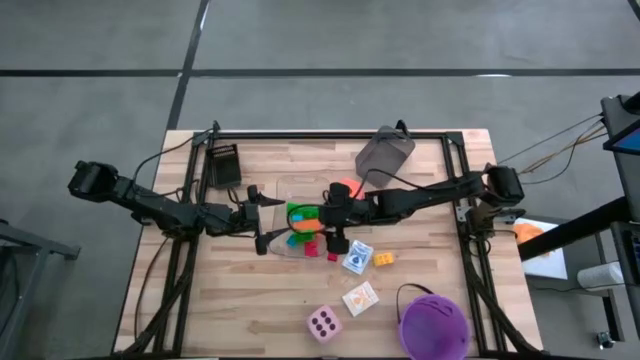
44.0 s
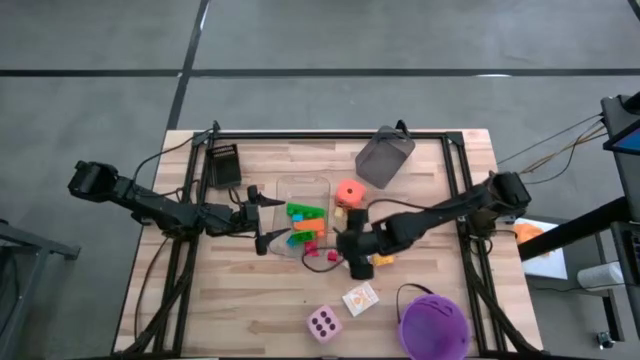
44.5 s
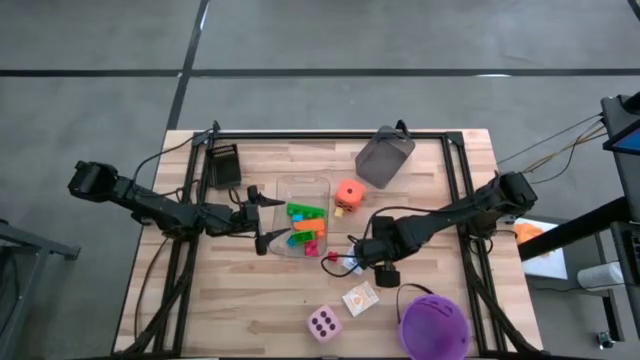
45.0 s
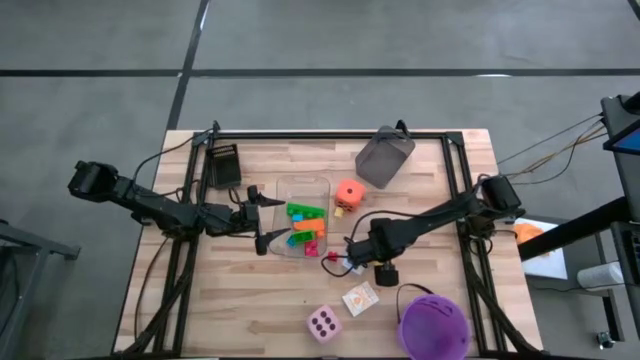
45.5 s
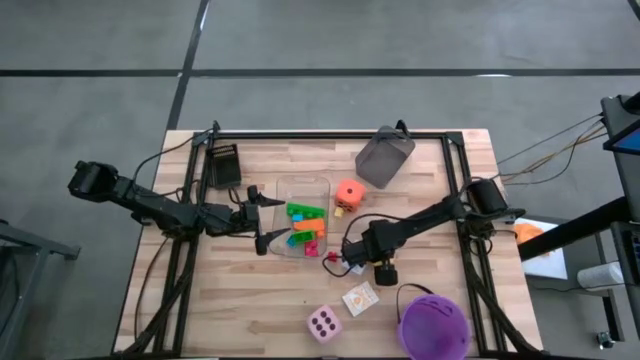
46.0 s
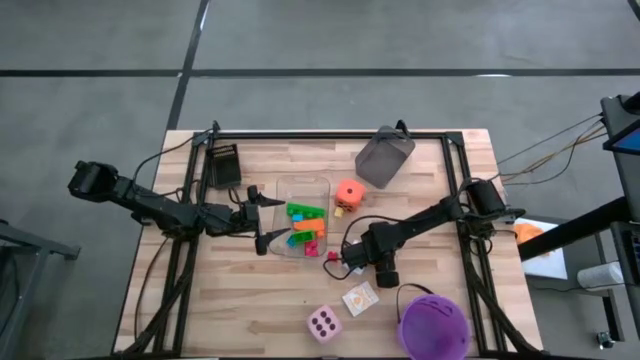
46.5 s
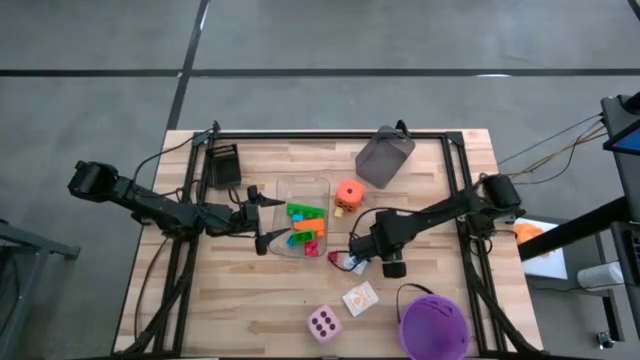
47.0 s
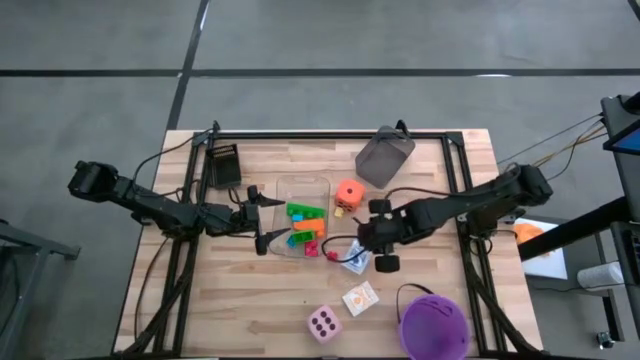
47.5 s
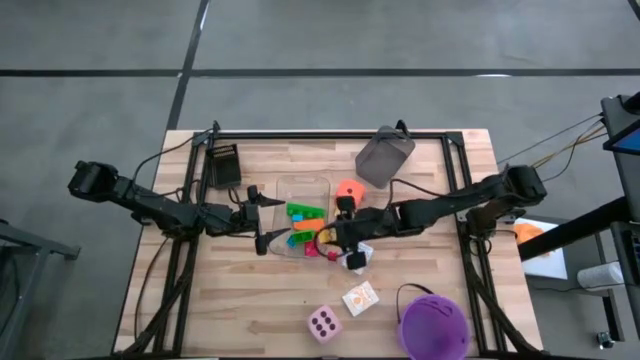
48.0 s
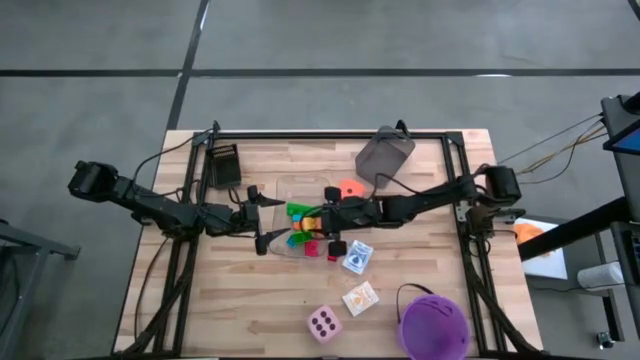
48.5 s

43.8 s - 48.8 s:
Task: Pick & Place Toys
Put the yellow game piece into the transparent bin

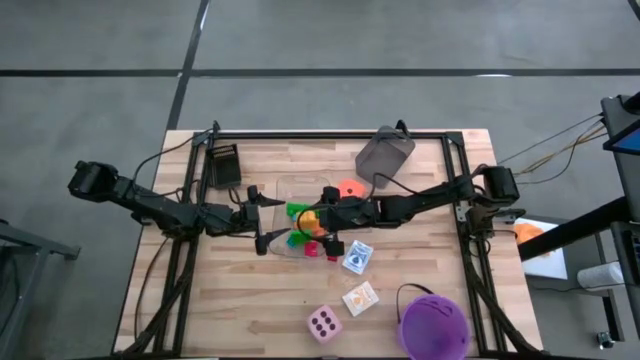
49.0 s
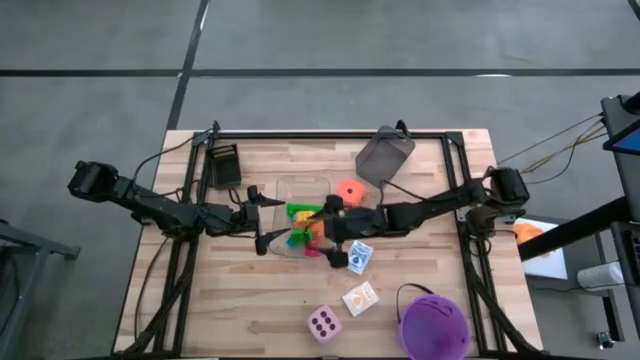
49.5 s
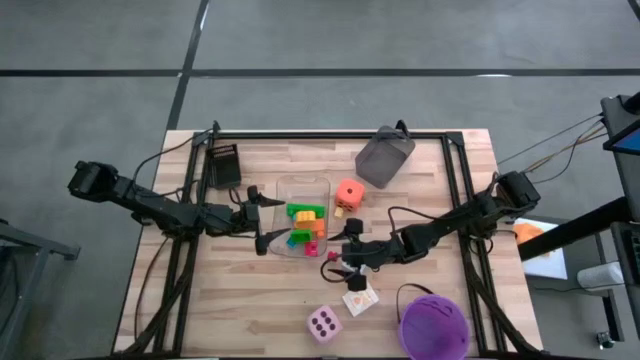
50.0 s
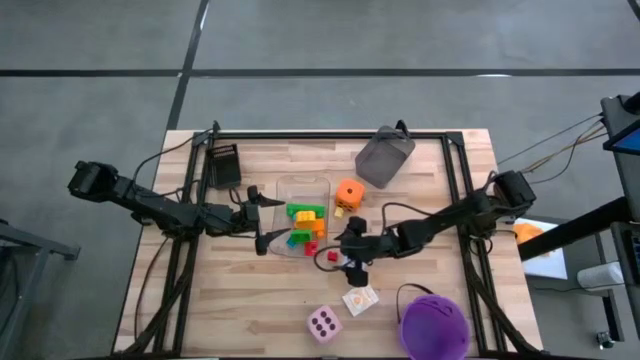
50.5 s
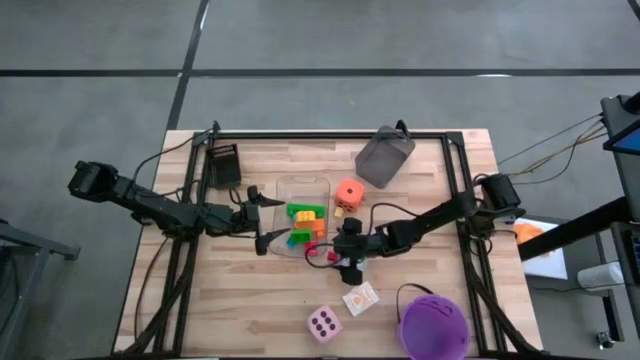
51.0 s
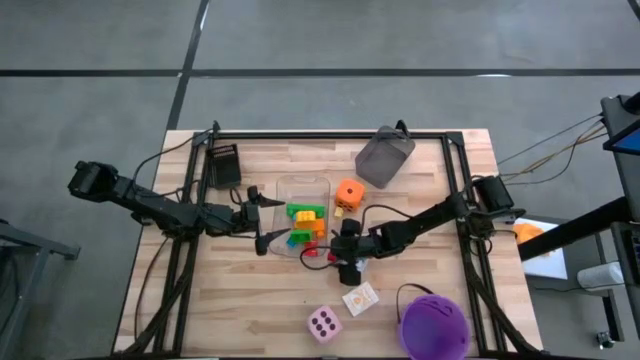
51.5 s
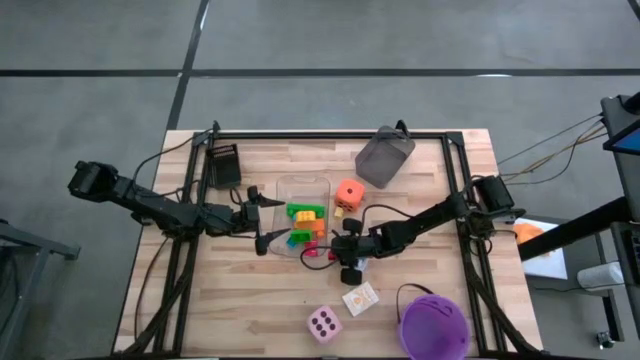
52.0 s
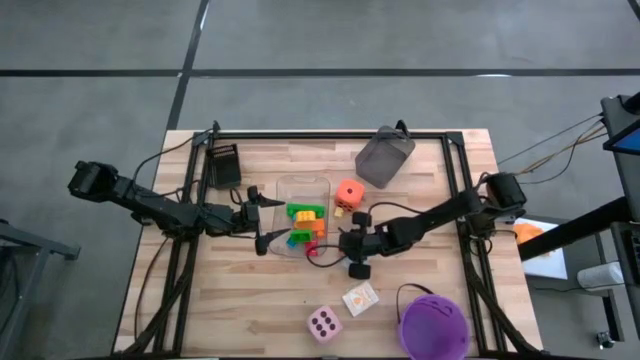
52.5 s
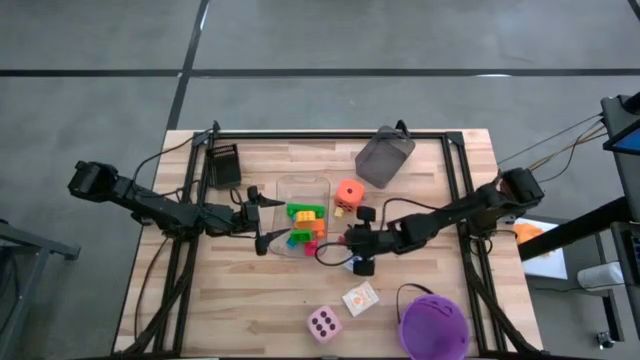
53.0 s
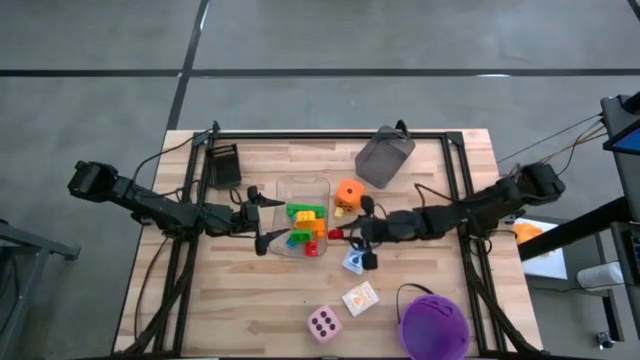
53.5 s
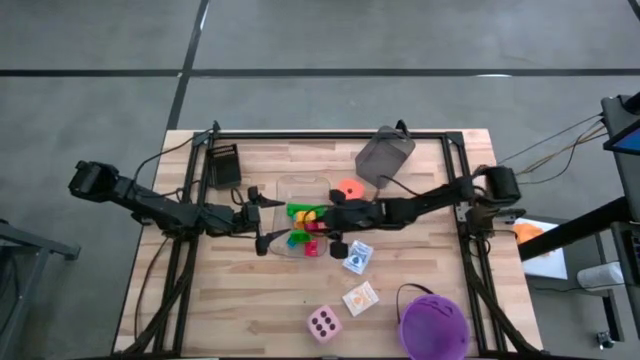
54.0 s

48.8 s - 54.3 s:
Put the red game piece into the transparent bin

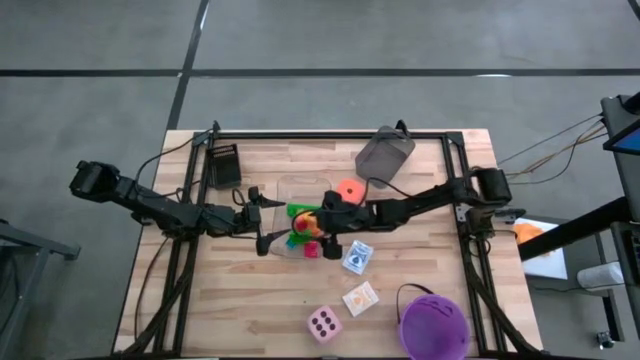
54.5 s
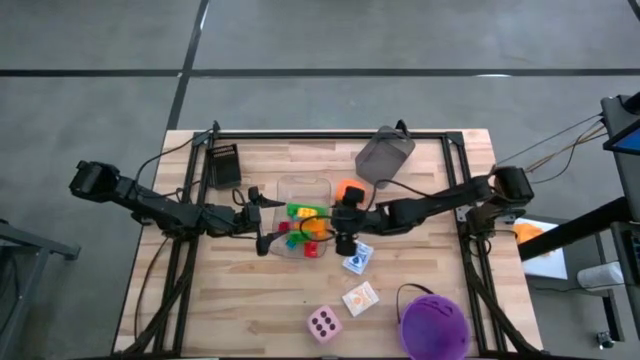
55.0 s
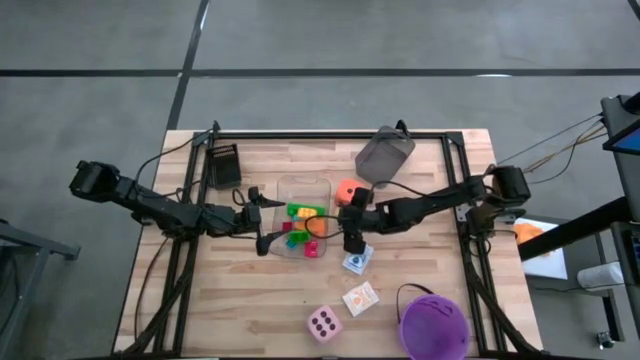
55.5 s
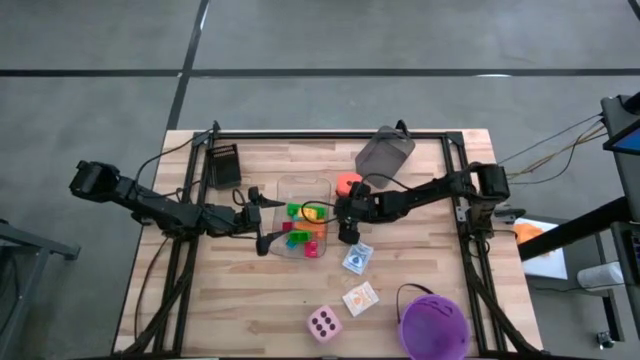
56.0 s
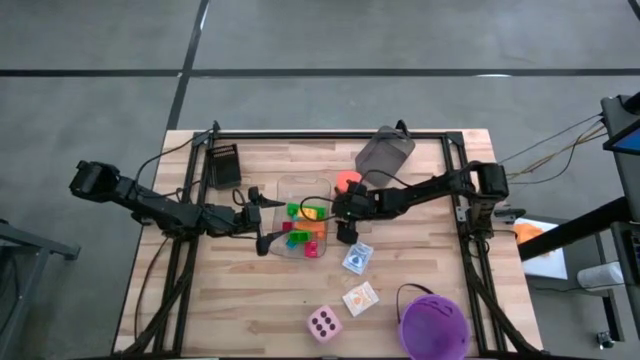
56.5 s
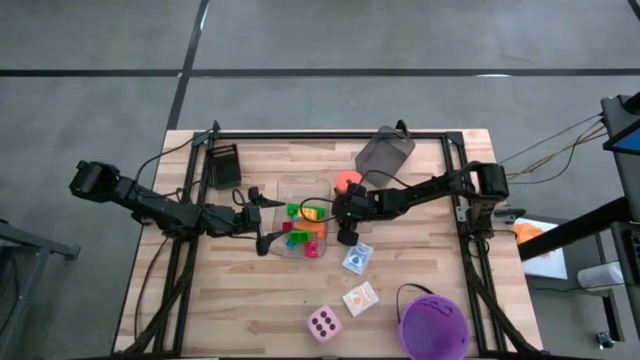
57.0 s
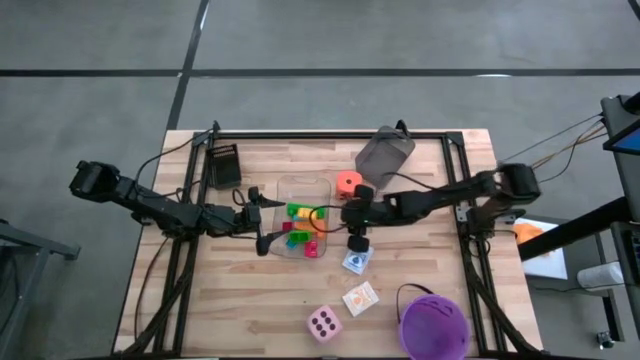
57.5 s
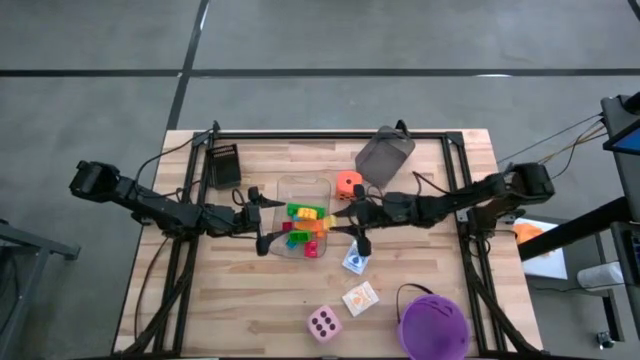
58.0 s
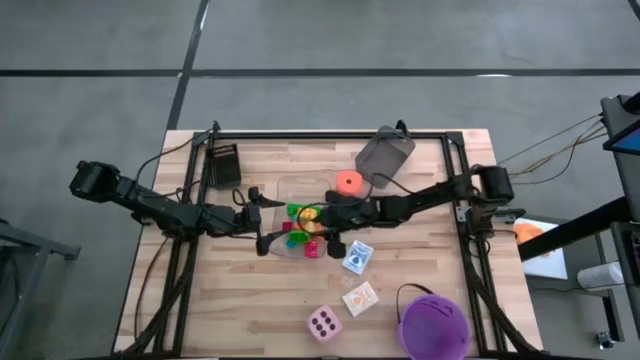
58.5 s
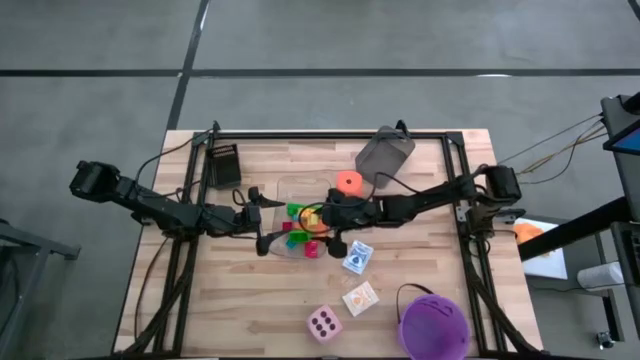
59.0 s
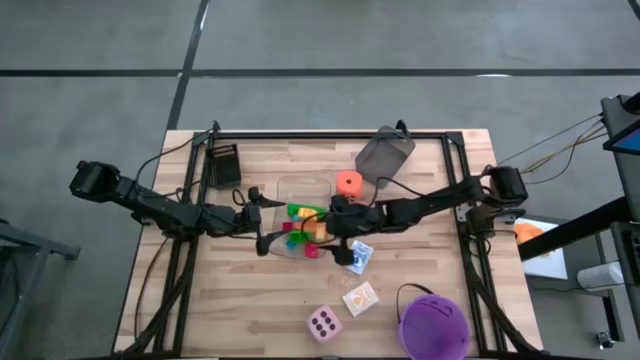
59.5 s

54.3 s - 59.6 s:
Put the light yellow game piece into the transparent bin

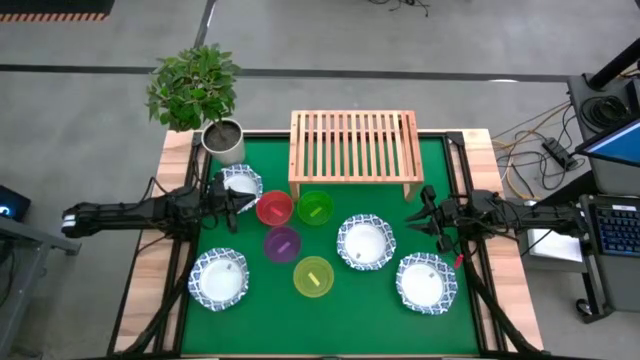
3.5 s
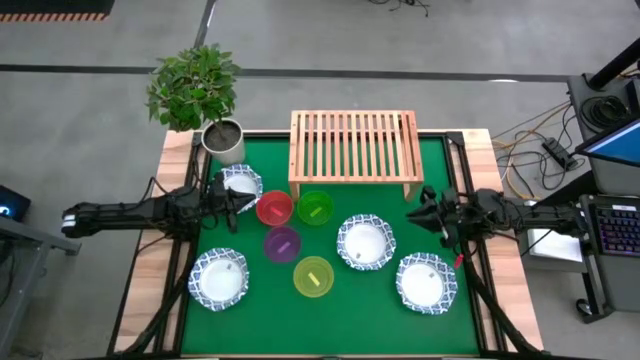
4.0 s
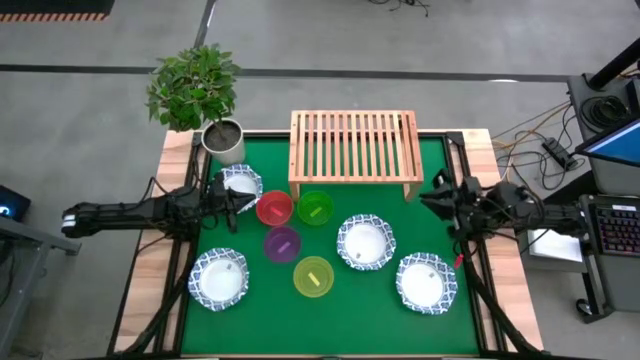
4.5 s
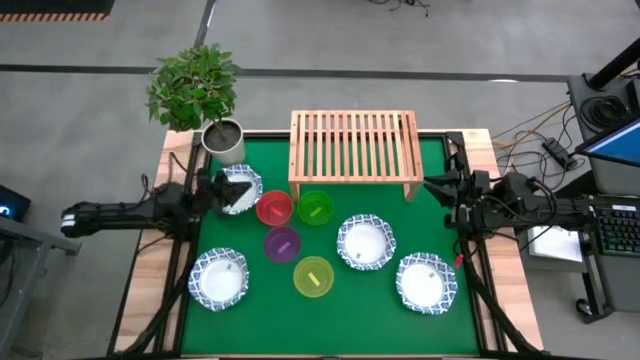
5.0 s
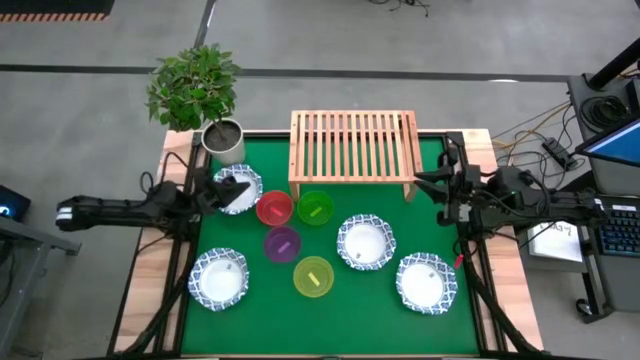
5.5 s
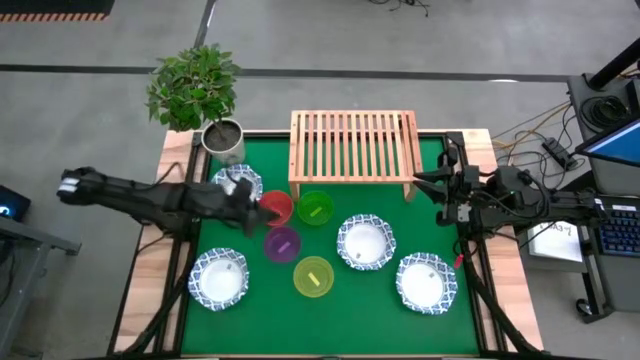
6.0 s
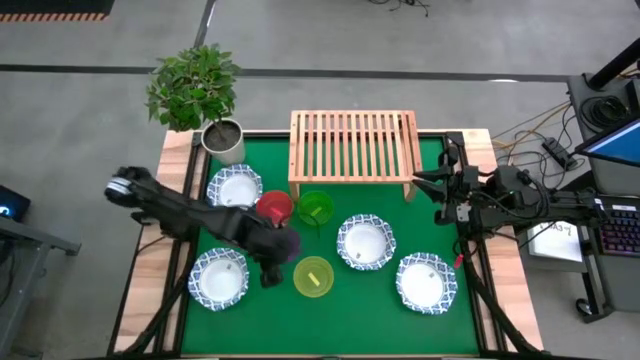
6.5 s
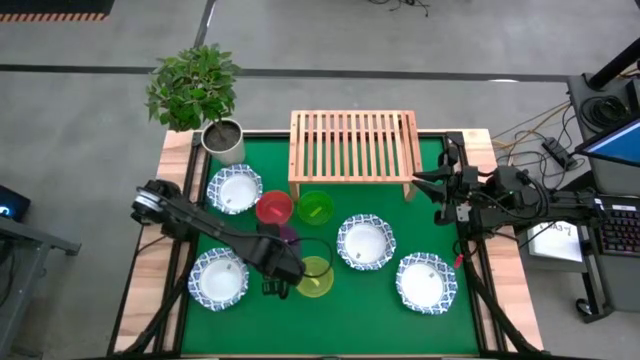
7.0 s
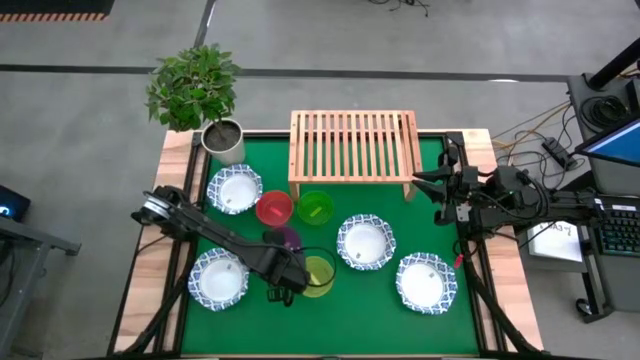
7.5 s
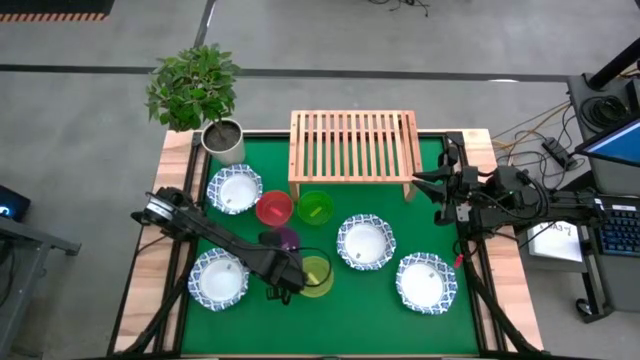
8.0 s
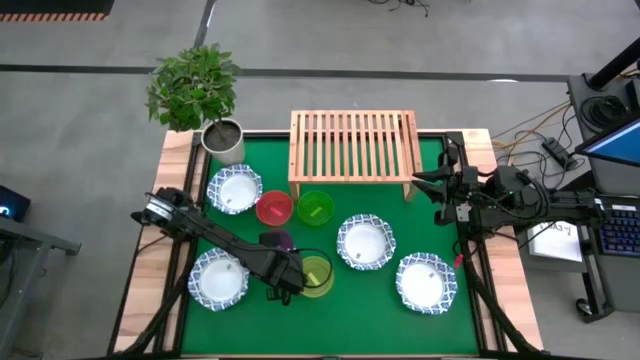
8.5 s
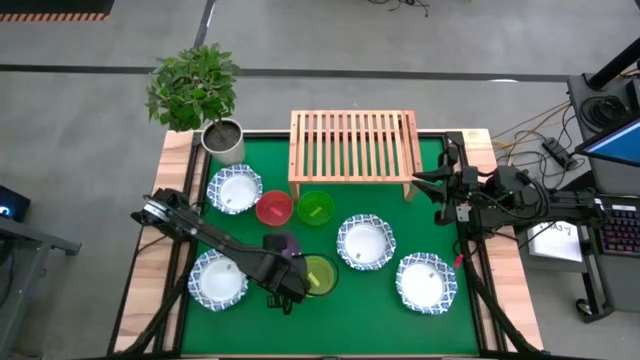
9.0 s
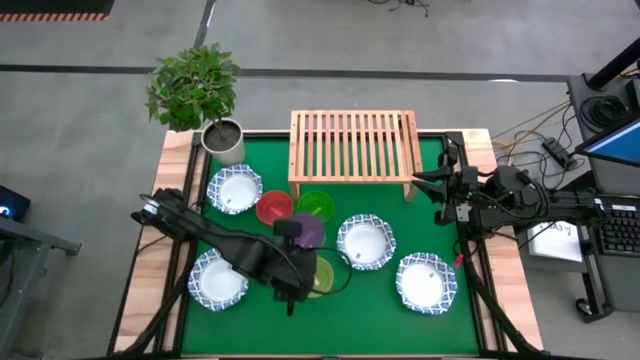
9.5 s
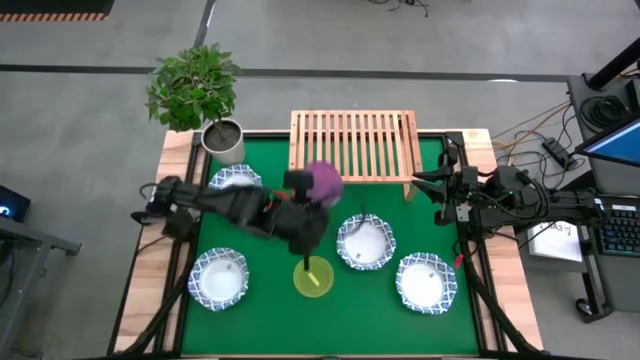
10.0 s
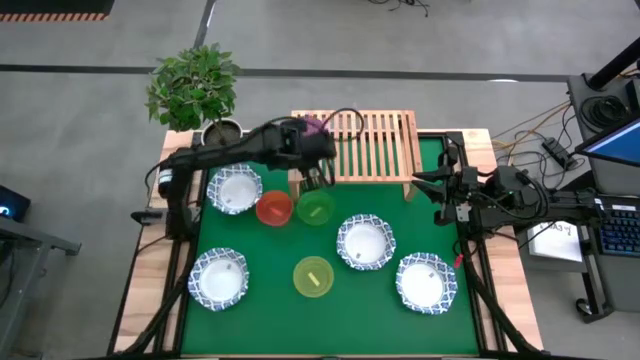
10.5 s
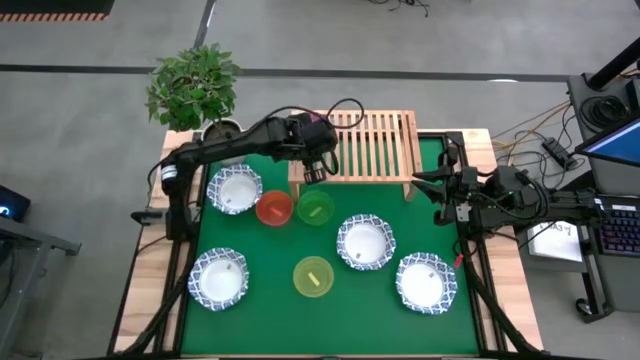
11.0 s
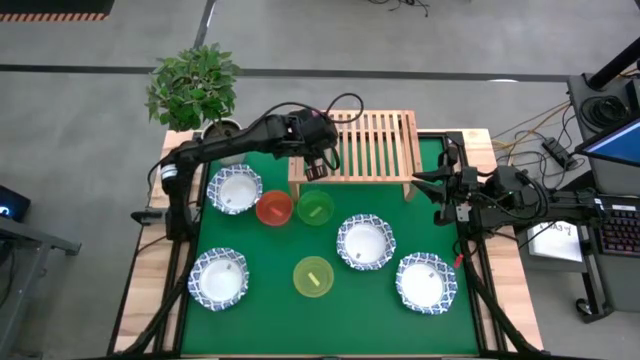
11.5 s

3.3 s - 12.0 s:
Task: Place and stack bowls onto a shelf
Put the purple bowl on the shelf
